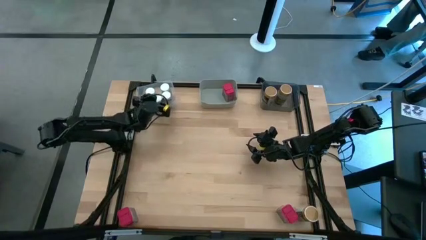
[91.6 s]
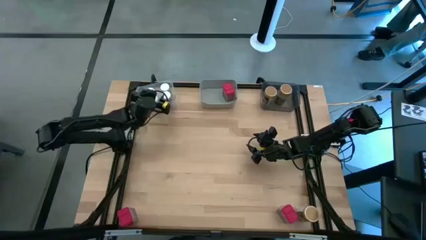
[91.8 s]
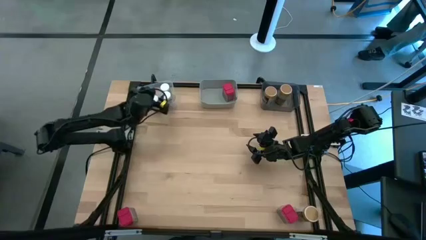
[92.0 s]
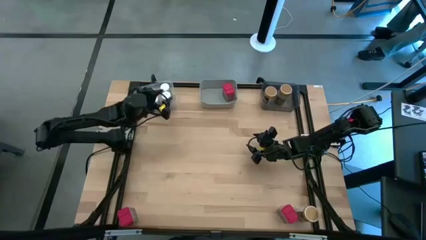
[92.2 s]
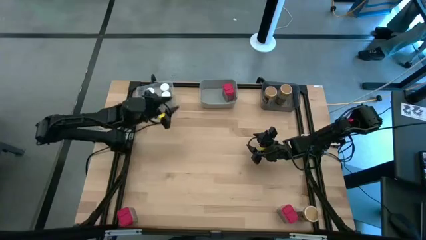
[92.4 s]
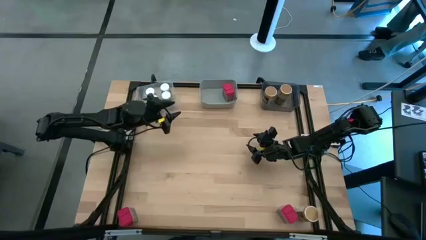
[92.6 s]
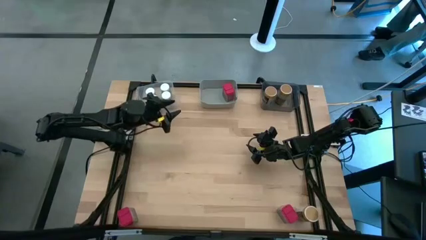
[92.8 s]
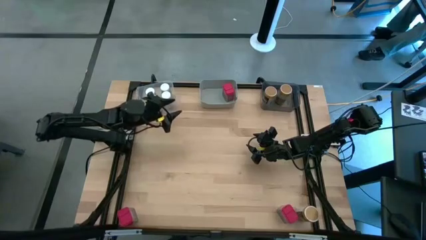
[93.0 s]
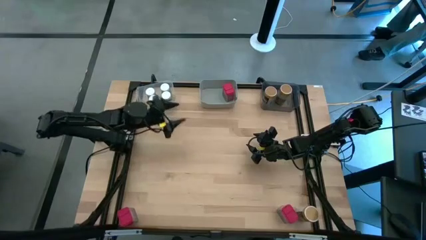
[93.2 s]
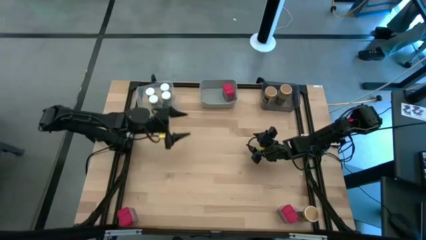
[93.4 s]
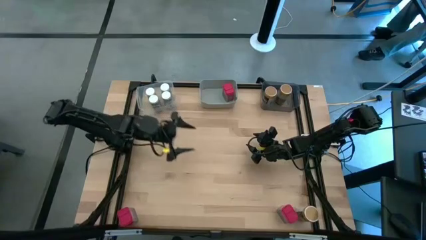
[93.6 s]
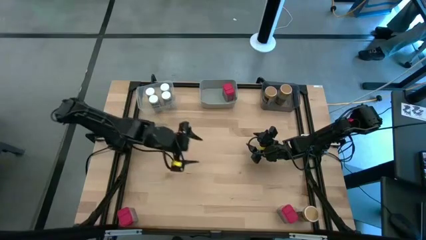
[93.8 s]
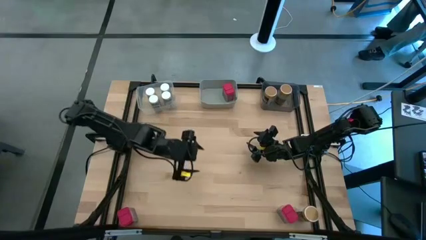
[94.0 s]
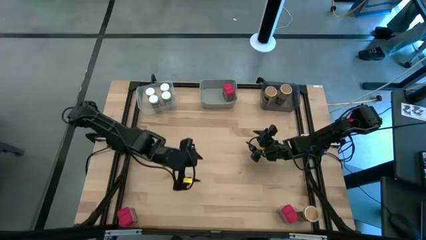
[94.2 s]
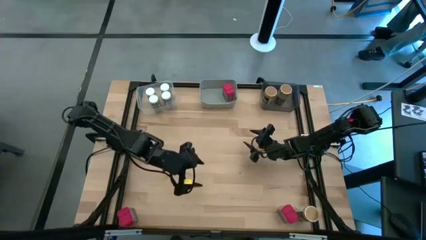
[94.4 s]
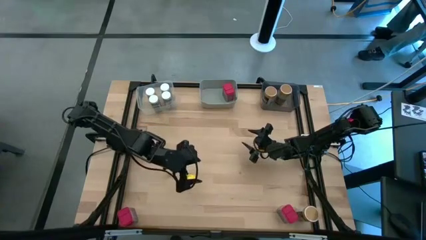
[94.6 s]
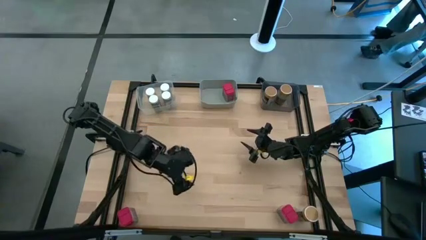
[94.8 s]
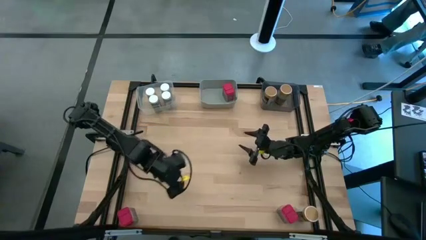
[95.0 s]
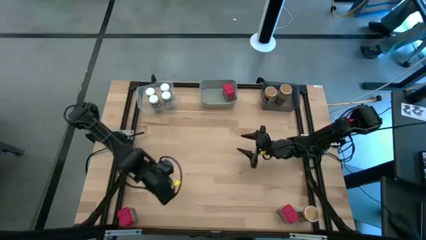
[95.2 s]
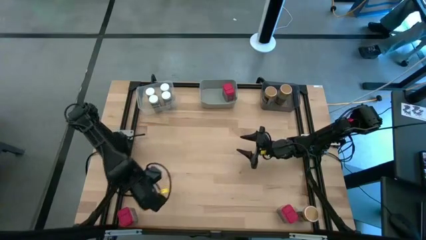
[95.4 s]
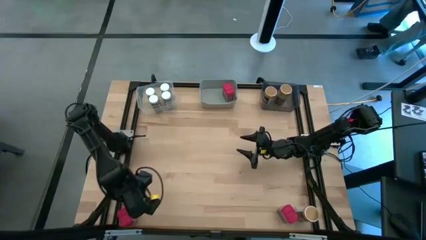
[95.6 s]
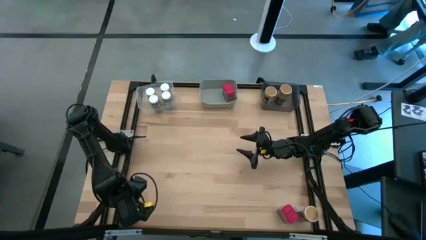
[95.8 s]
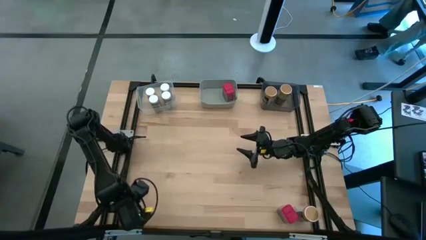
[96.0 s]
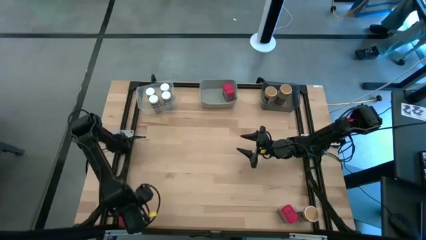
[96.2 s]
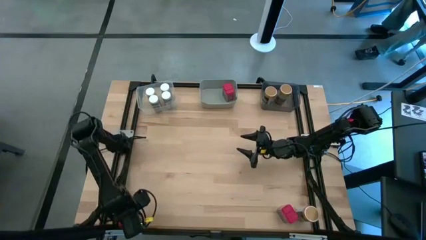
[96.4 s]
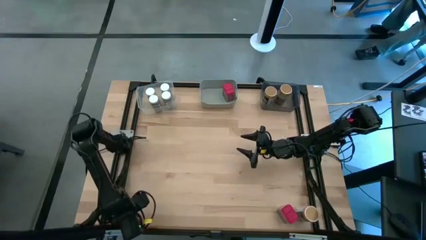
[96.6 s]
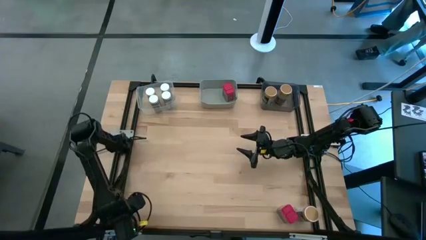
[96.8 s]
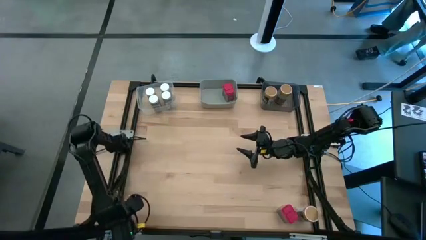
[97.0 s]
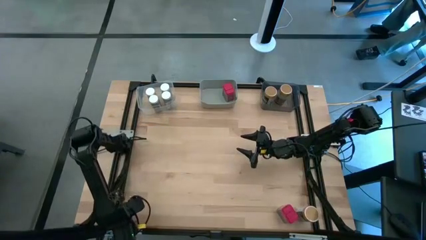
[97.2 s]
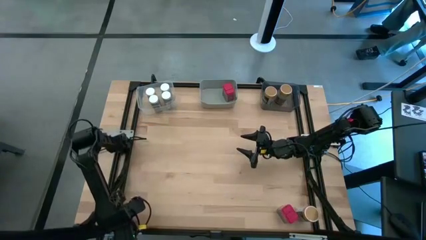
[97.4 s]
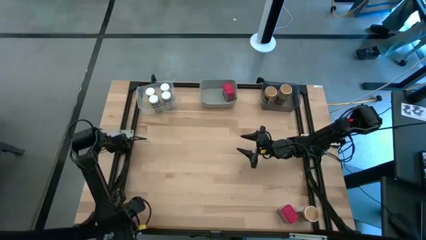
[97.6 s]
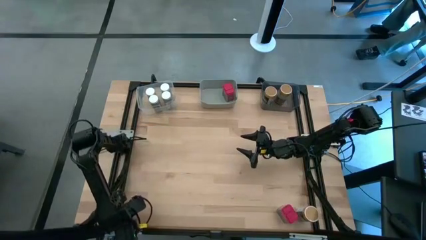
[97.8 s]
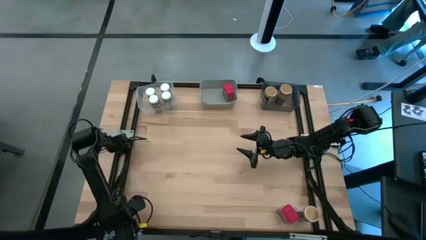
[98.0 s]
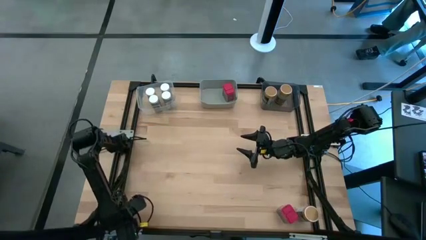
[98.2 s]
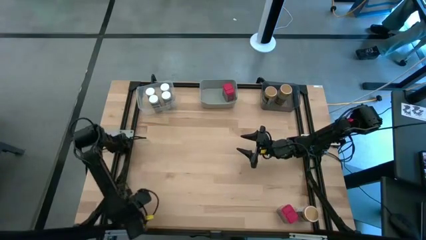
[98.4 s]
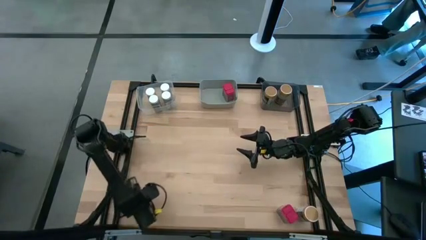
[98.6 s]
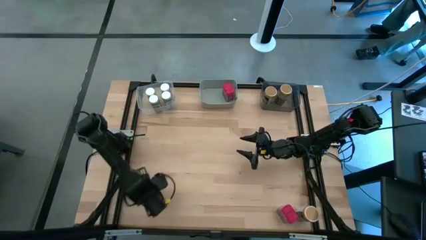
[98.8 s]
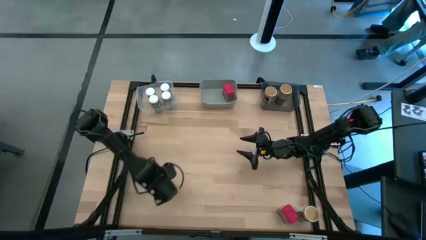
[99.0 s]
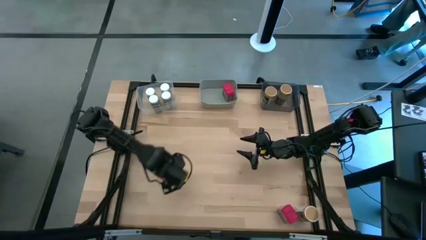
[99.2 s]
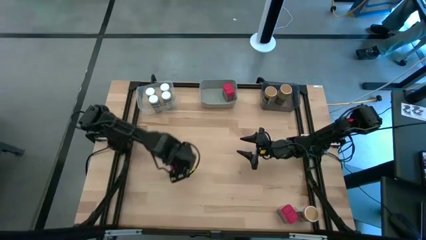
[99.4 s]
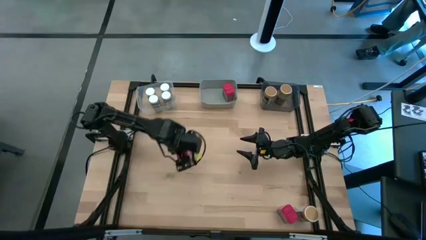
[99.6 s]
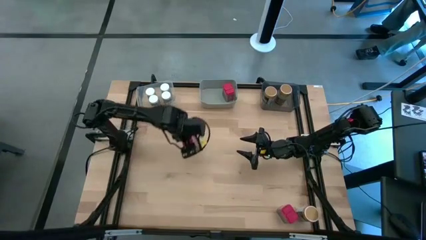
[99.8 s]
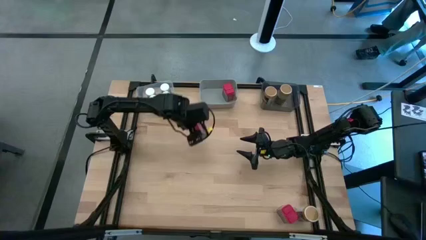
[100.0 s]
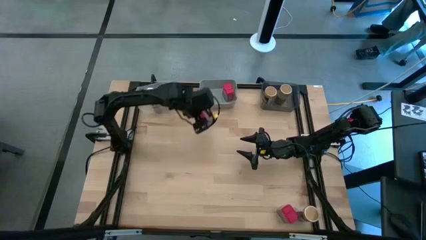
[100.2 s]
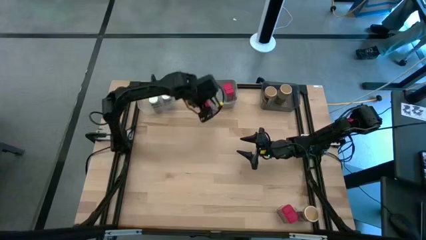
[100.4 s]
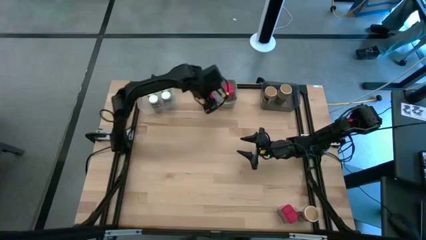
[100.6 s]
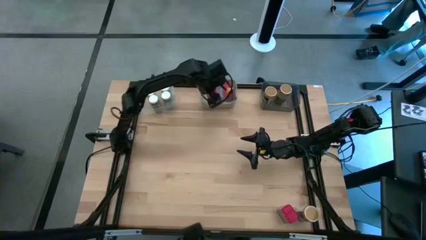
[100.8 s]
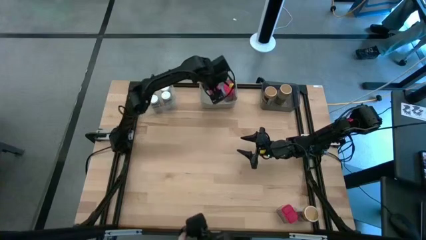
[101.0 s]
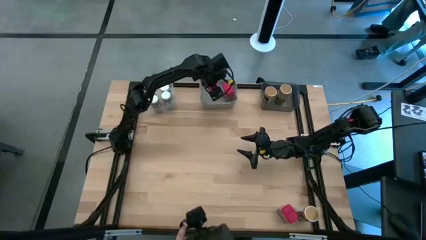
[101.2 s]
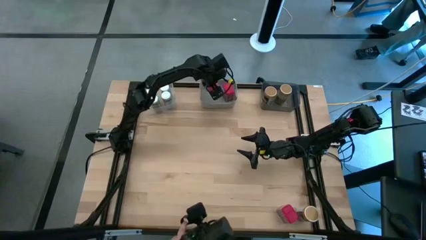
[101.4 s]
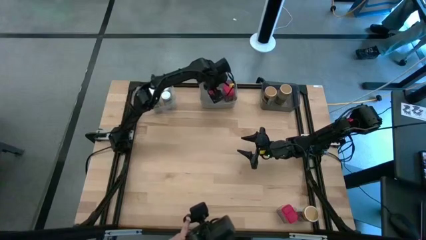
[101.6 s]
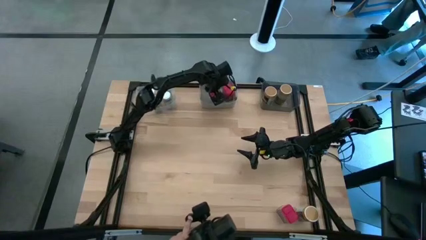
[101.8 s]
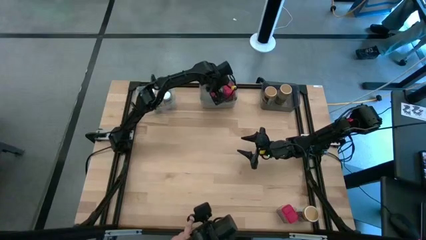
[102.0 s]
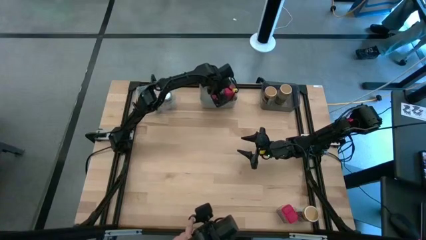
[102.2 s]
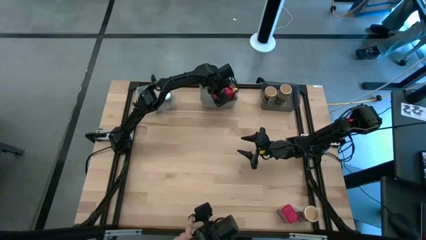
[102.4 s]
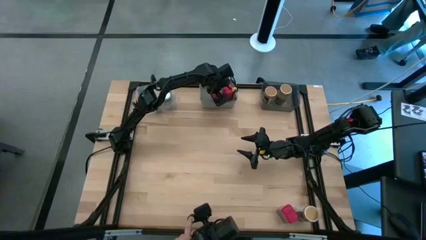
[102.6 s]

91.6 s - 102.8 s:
Task: Sort spices by type
Put the red seasoning can into the gray bin

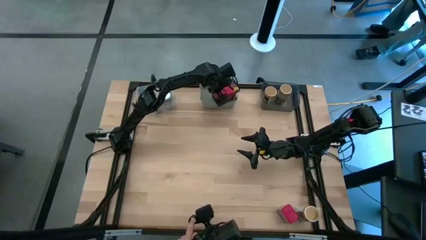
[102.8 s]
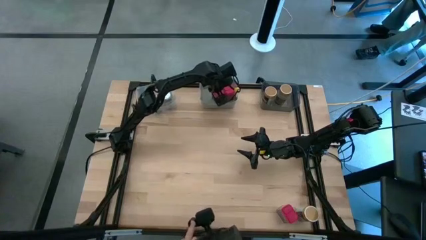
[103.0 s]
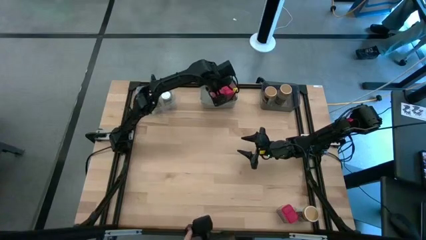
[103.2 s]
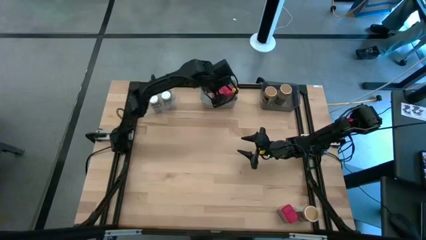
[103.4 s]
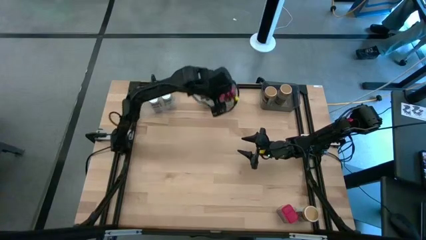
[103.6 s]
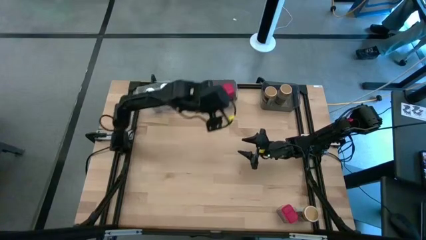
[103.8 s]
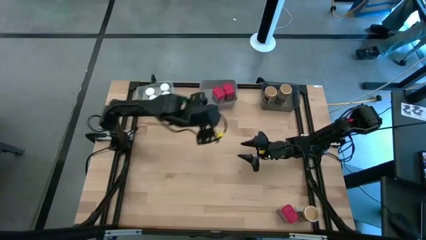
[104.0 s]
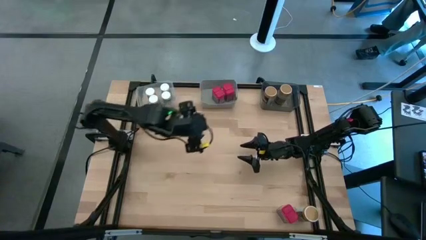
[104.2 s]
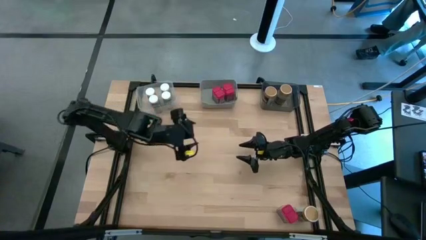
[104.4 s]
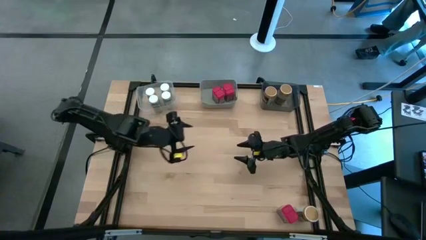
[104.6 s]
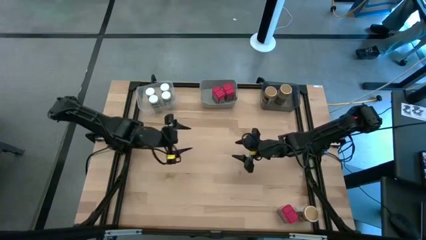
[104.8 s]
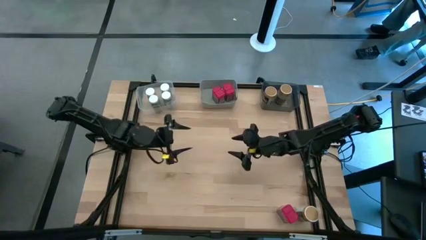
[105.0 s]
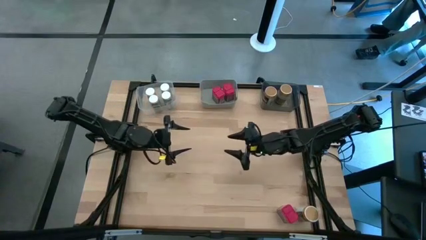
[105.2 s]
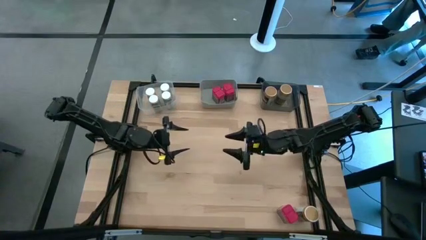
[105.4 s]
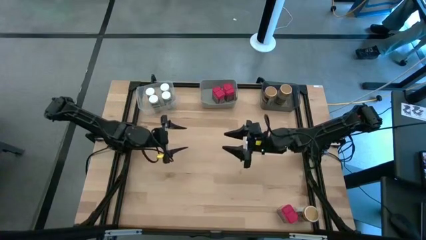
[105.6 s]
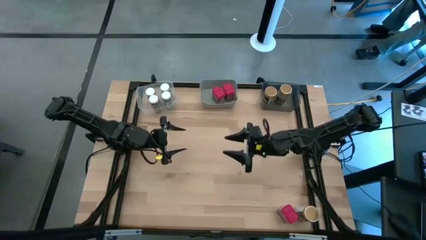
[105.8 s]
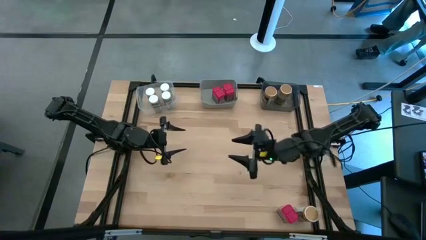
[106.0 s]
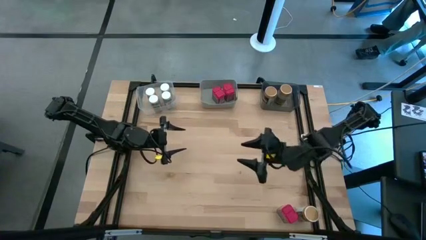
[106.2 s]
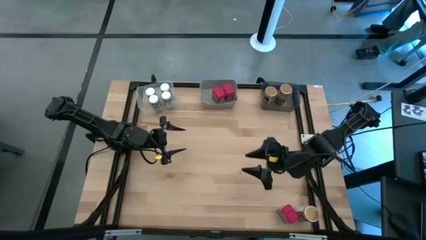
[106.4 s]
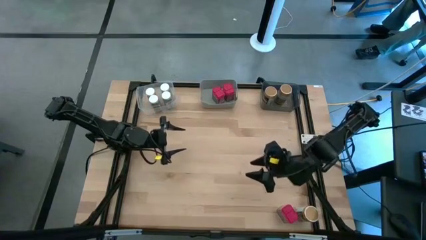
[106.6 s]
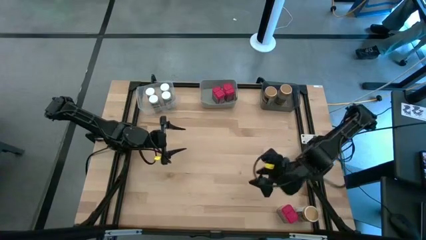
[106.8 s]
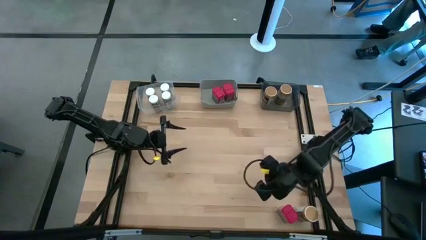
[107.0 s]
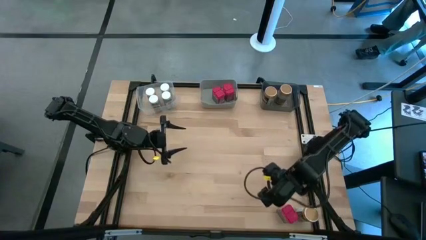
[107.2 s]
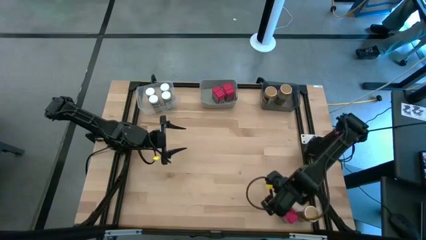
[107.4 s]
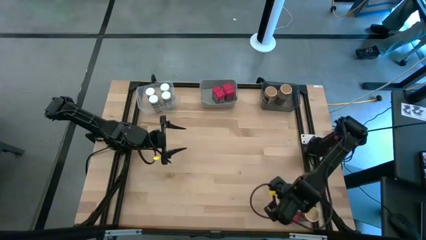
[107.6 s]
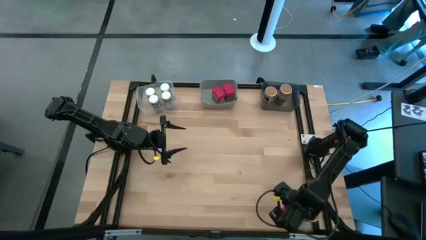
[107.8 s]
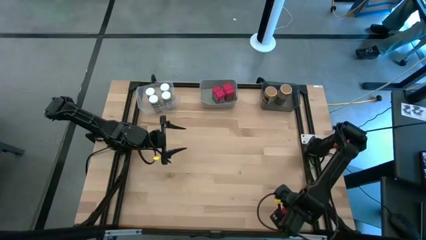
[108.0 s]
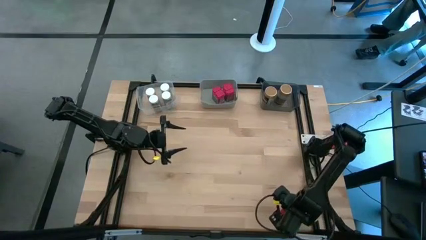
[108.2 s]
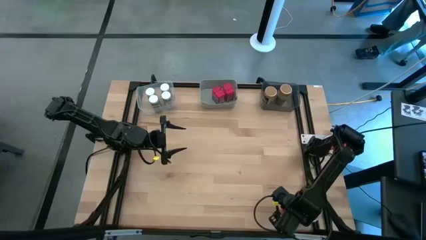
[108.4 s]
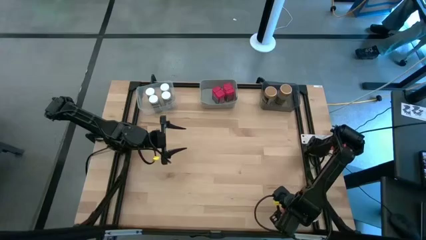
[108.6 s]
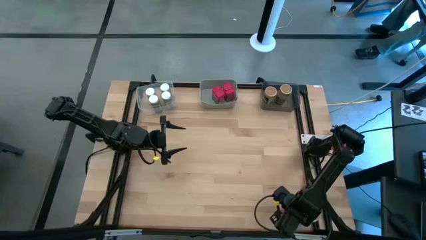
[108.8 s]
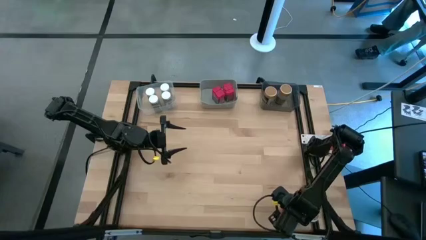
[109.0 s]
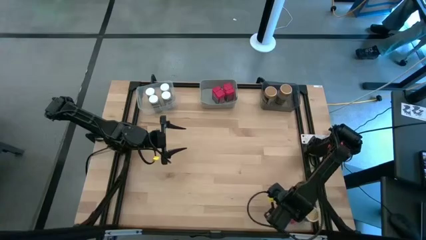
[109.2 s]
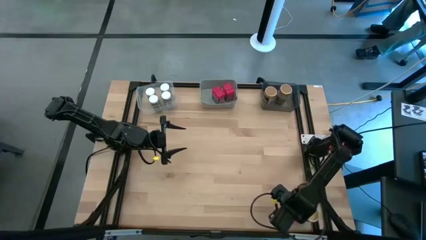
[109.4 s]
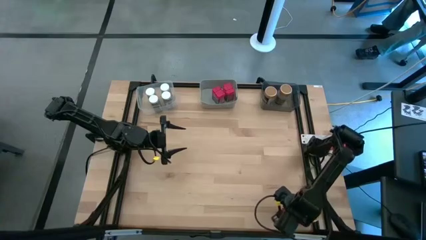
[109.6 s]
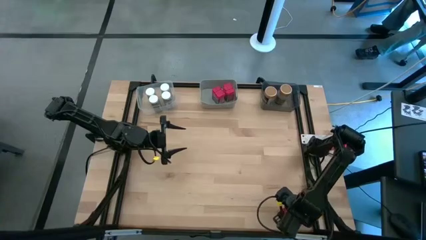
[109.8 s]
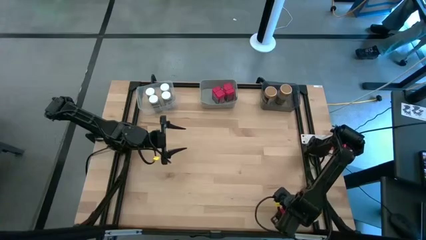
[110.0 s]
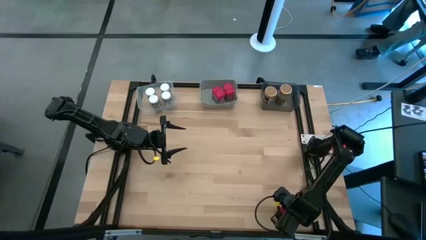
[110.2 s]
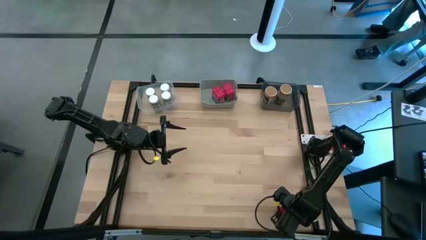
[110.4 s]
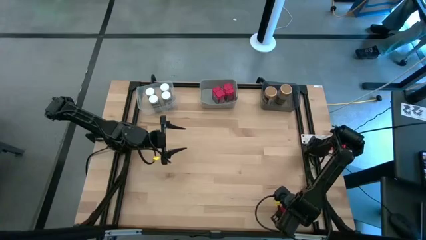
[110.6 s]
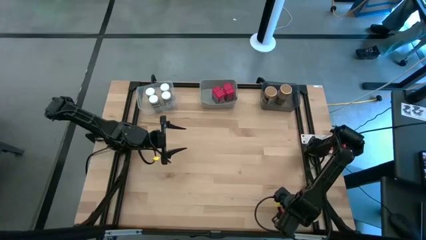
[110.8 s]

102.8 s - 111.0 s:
Put the red seasoning can into the gray bin
